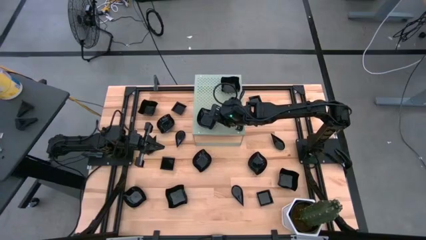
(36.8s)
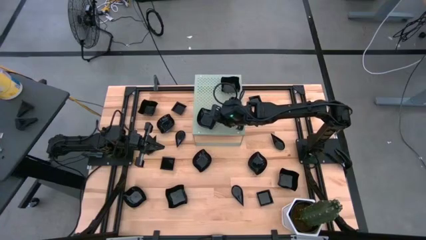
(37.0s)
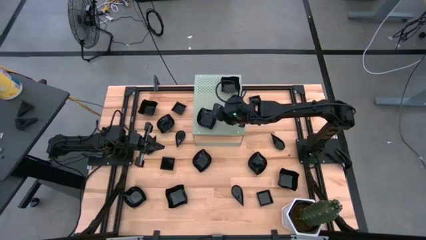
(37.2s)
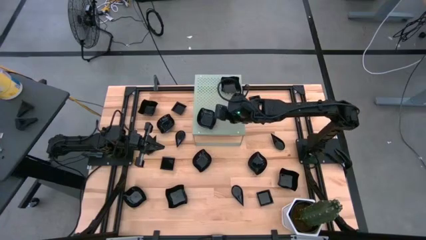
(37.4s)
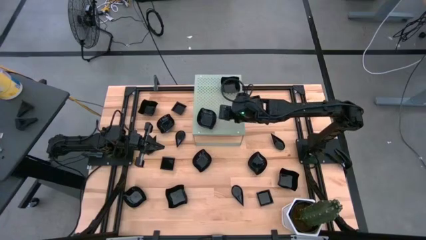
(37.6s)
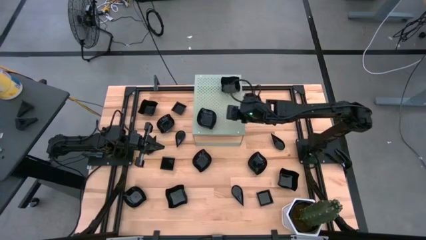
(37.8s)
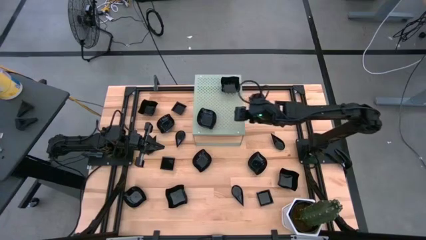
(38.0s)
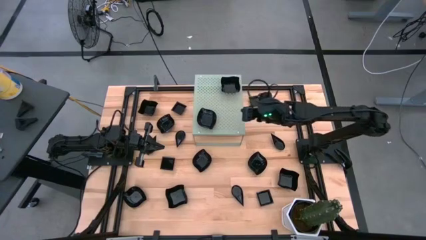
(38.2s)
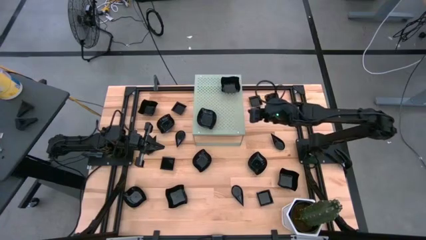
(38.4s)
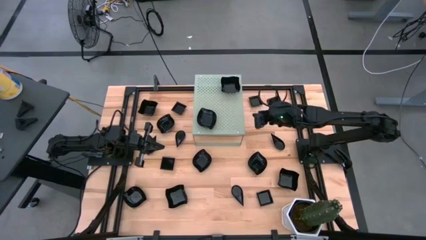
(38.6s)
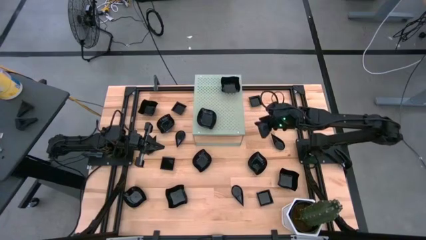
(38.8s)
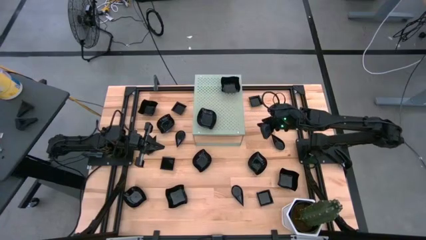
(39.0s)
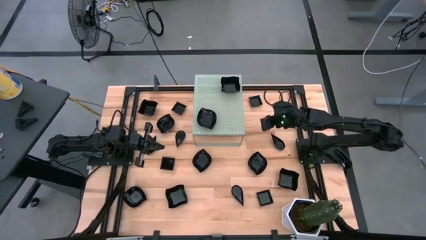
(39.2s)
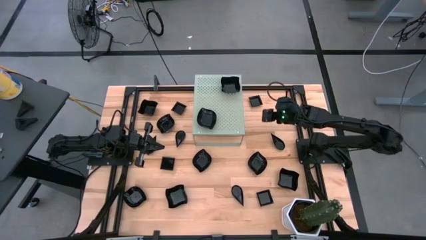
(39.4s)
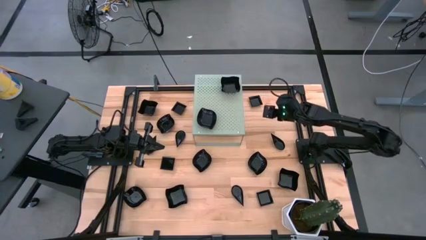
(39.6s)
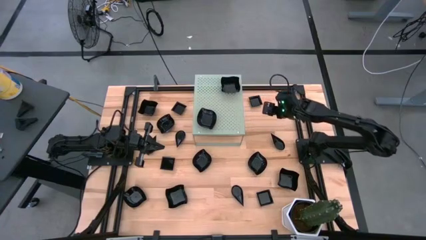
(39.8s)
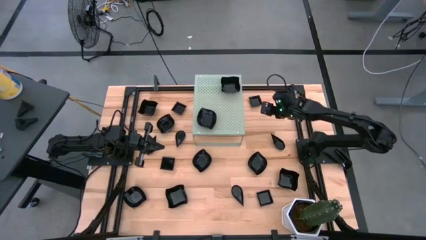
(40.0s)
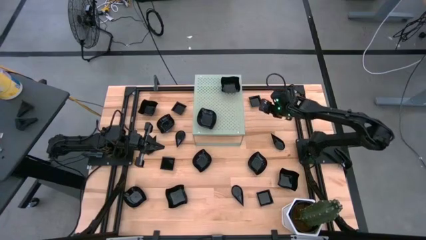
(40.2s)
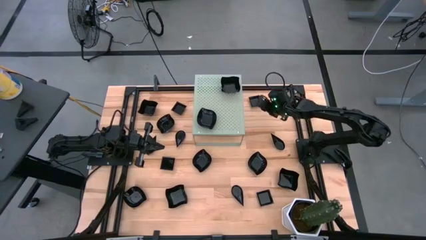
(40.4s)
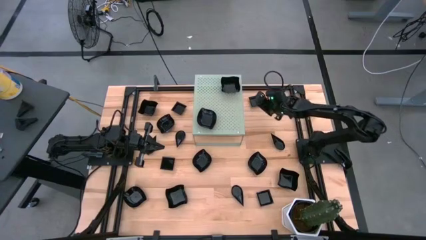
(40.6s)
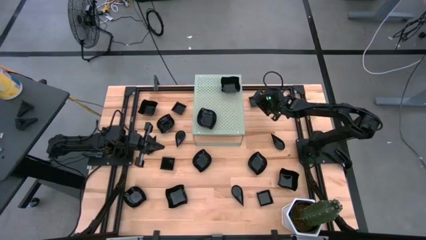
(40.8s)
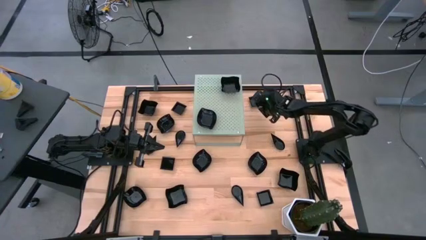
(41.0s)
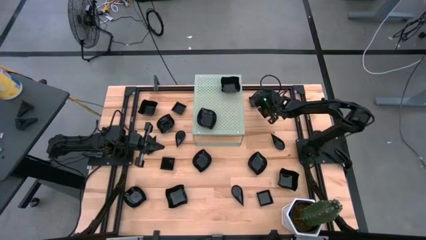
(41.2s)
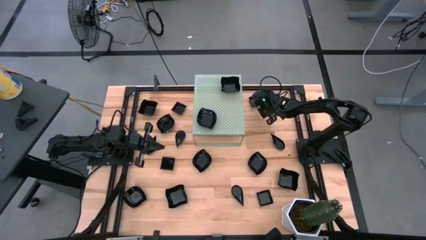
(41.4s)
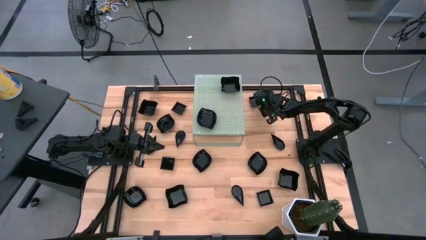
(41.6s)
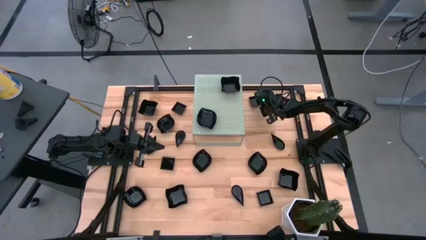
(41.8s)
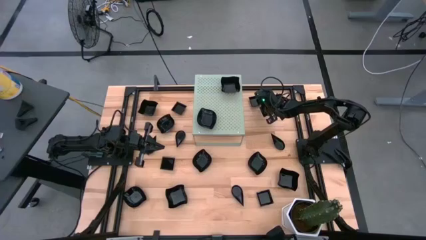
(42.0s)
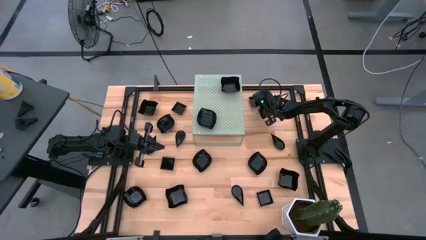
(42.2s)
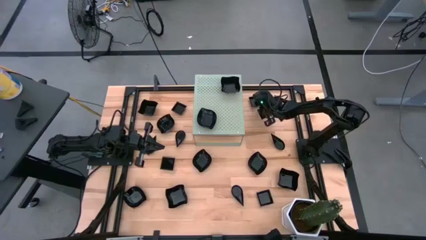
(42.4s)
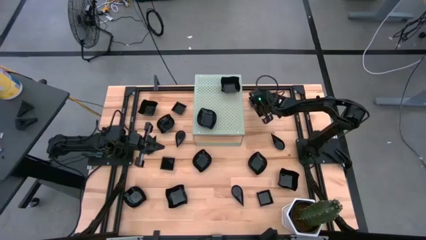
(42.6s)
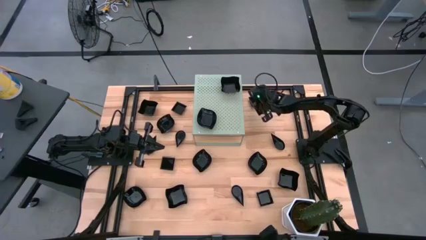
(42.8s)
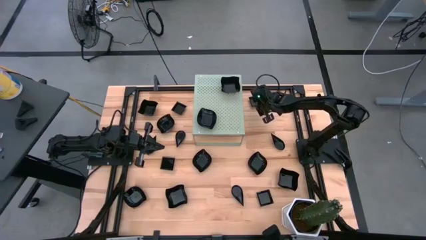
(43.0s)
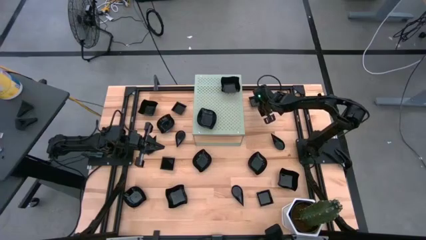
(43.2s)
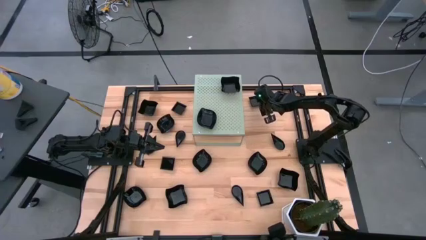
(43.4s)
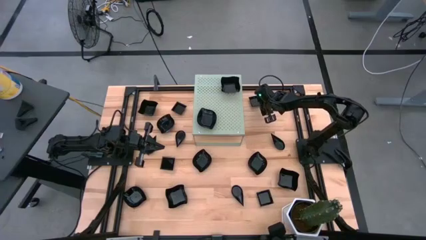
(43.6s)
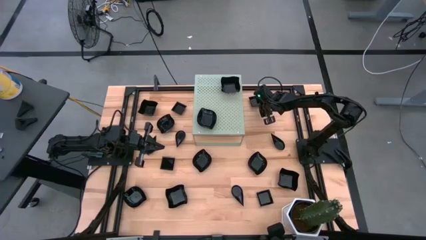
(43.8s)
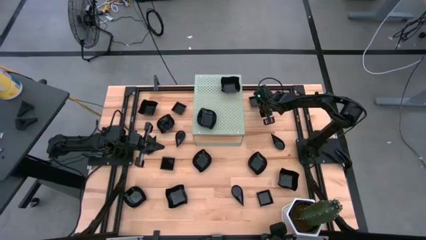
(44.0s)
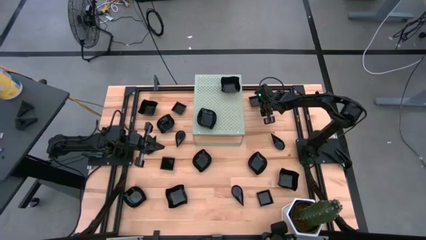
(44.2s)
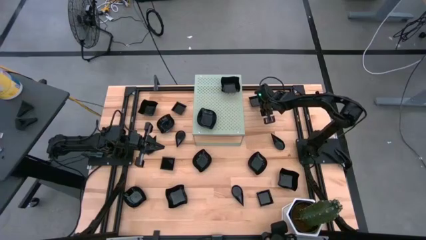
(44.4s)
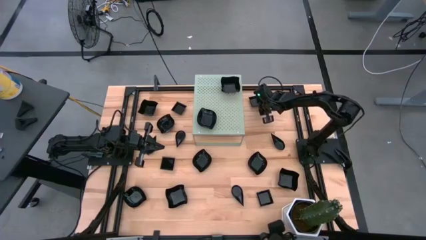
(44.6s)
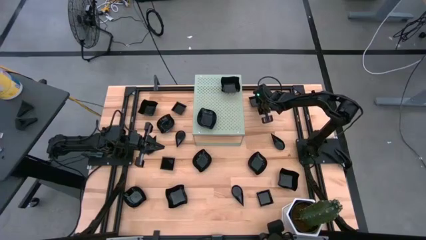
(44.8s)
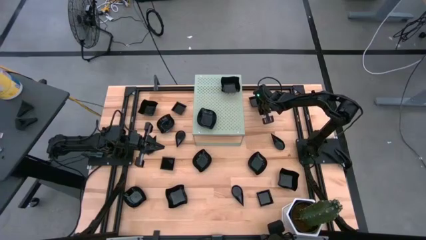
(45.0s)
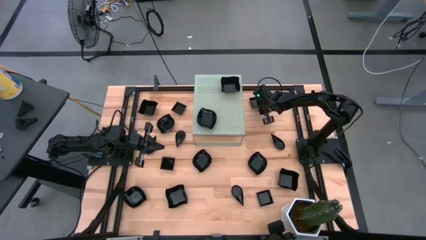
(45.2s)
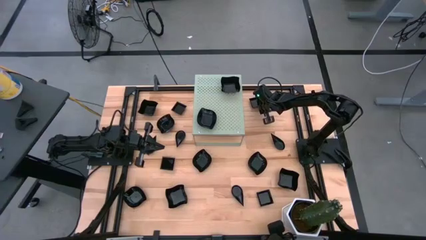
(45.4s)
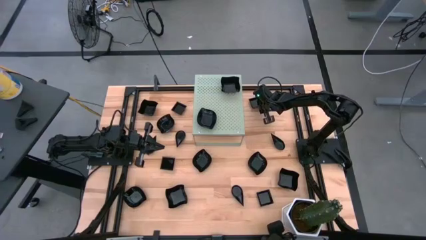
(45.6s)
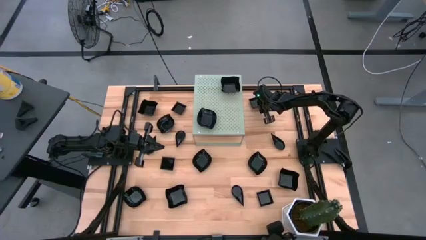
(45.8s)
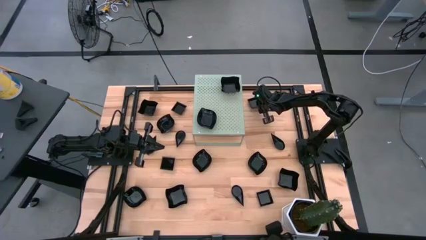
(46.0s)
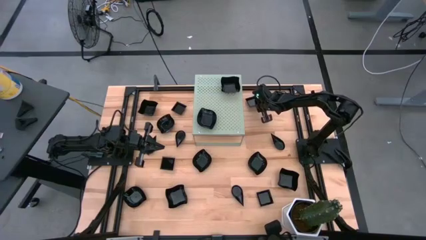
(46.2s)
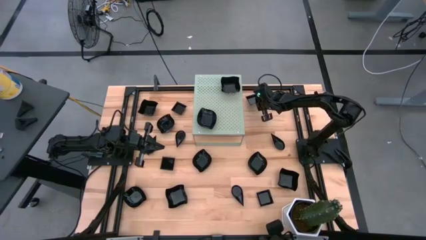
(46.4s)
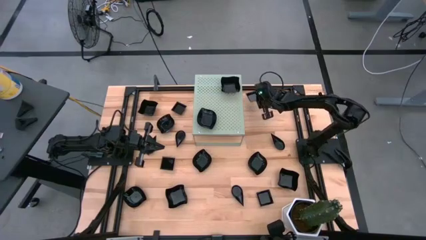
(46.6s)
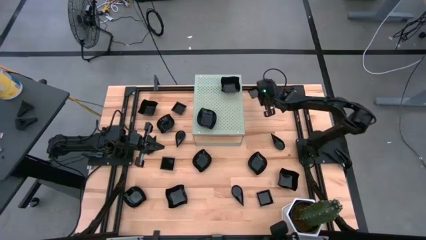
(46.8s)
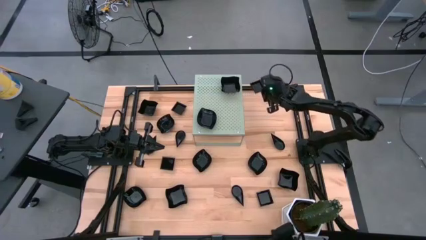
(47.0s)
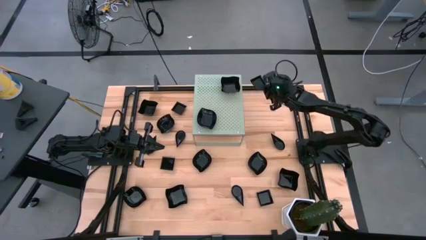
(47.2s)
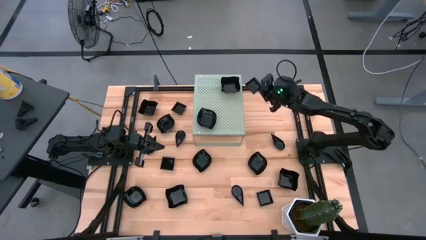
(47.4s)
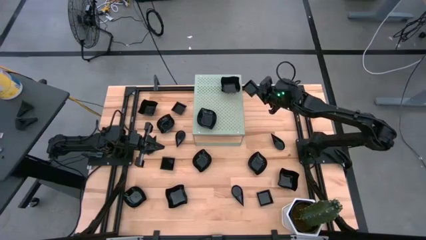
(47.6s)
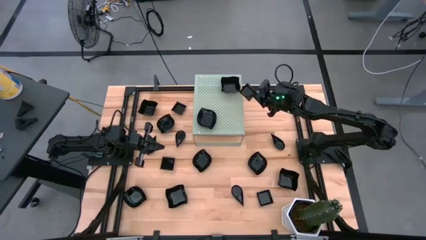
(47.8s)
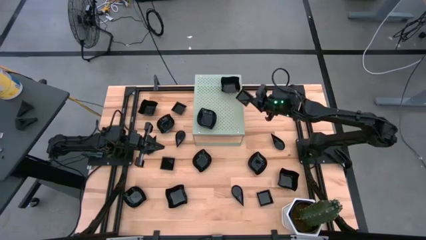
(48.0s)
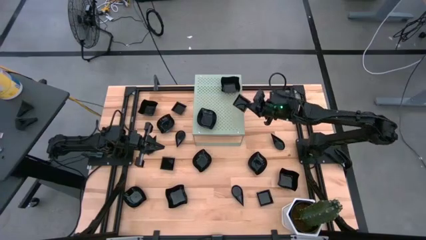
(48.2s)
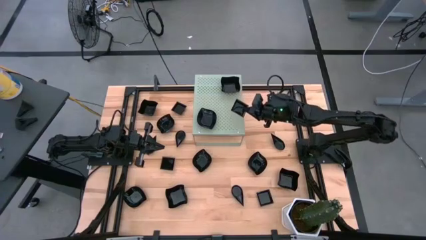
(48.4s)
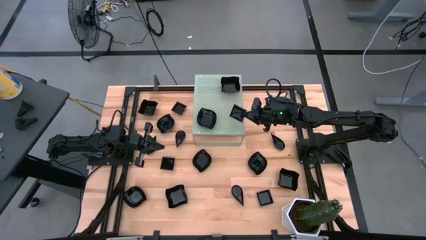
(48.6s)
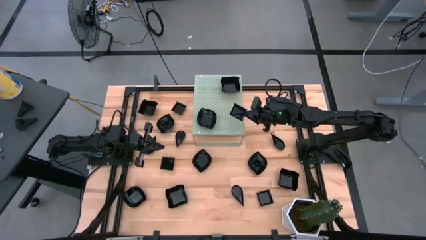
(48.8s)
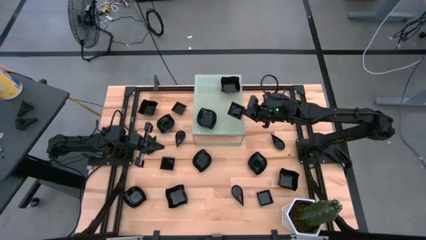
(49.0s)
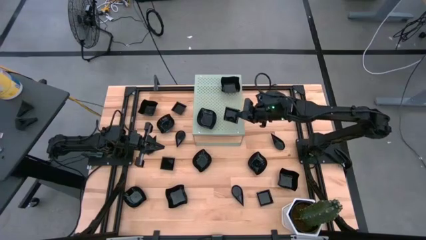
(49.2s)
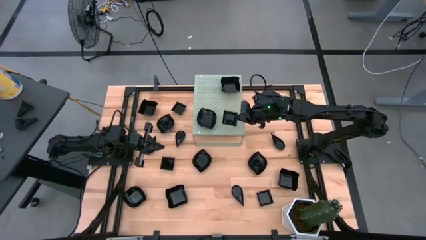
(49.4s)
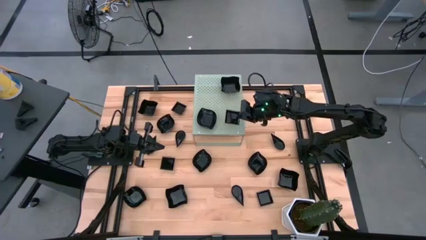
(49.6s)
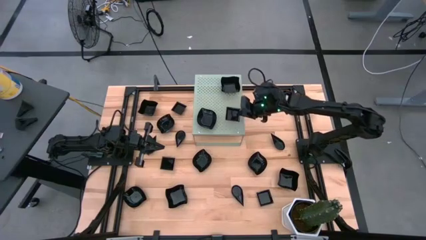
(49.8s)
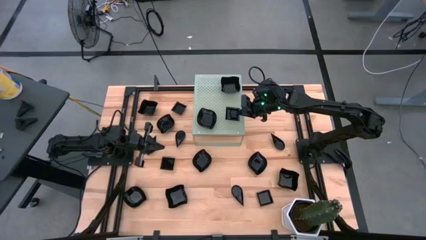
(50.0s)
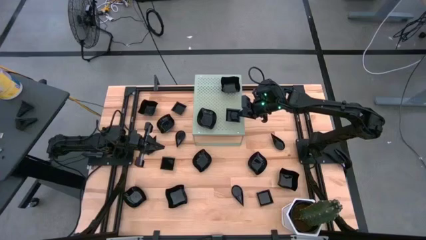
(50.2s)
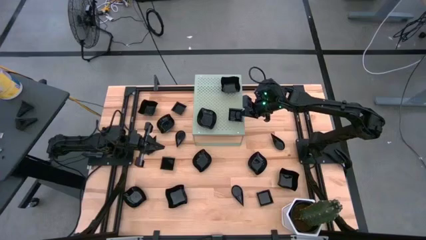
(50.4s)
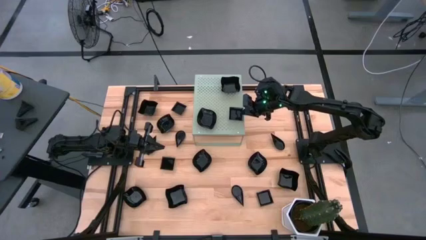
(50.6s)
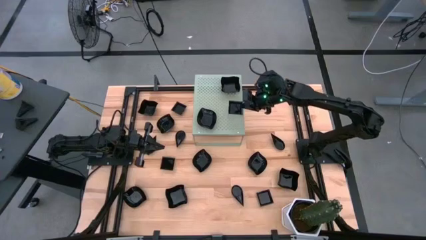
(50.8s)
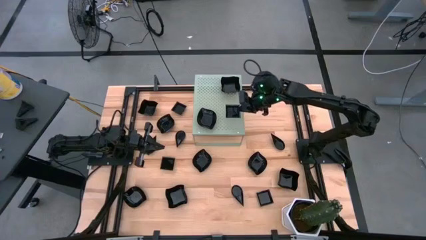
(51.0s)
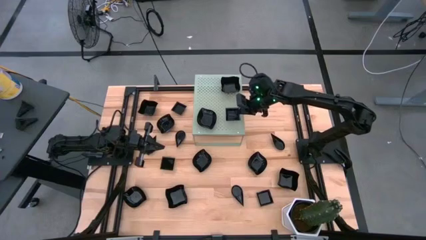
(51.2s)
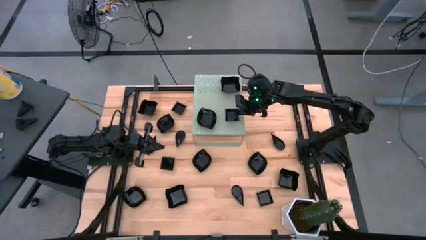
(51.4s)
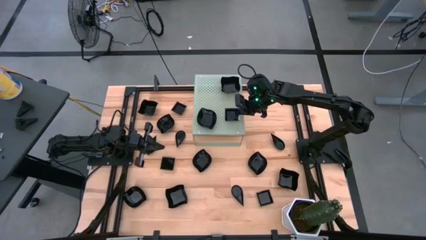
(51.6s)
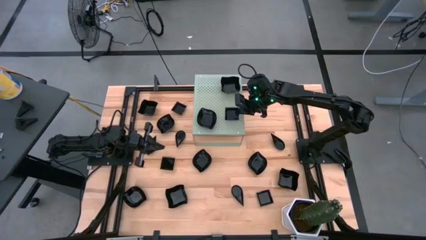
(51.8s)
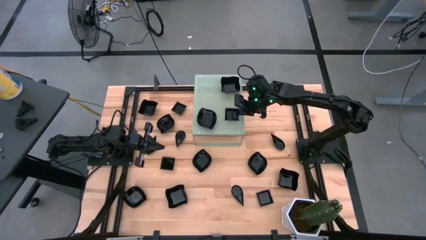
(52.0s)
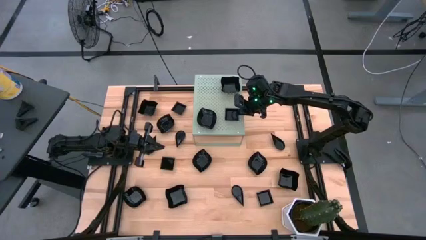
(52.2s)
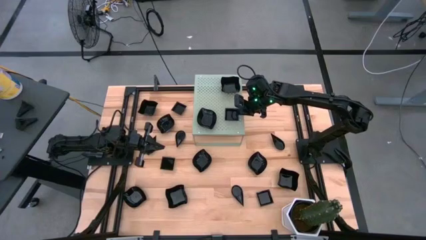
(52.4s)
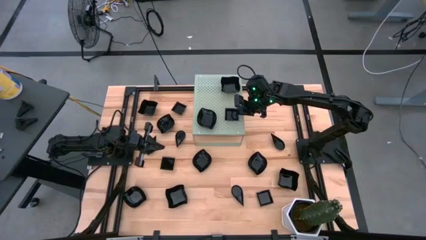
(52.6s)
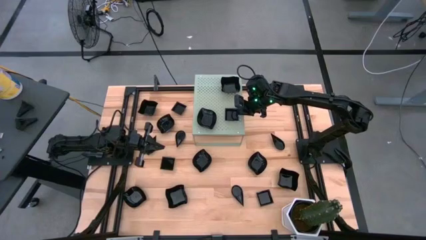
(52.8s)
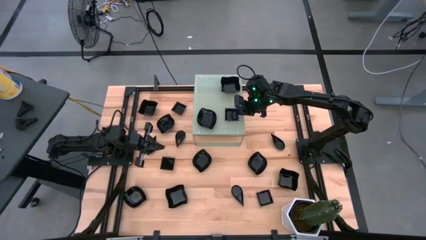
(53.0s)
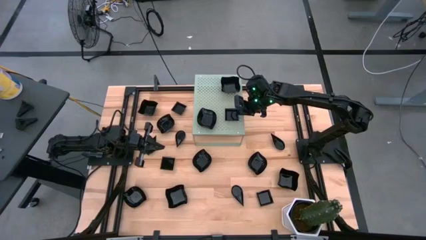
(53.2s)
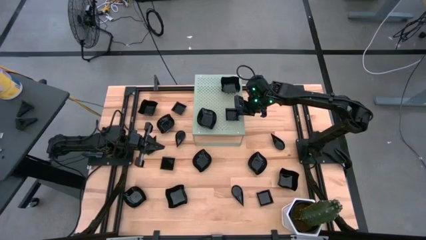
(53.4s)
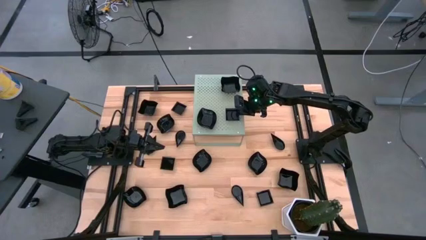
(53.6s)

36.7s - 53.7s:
Task: Pick & Place Mini shaped plates
Put the square plate on the shelf
